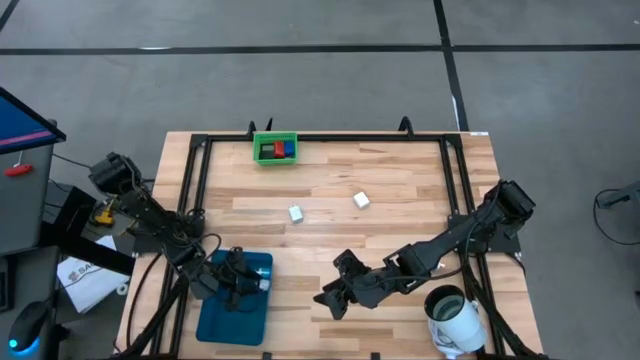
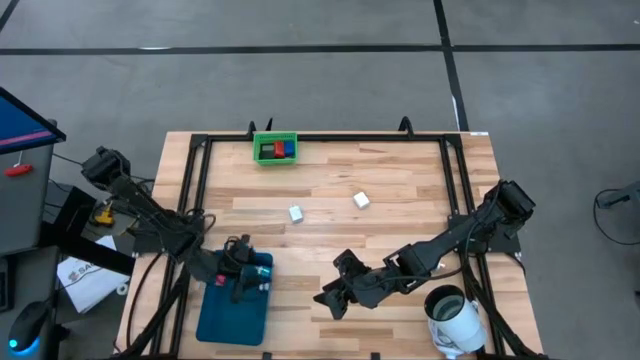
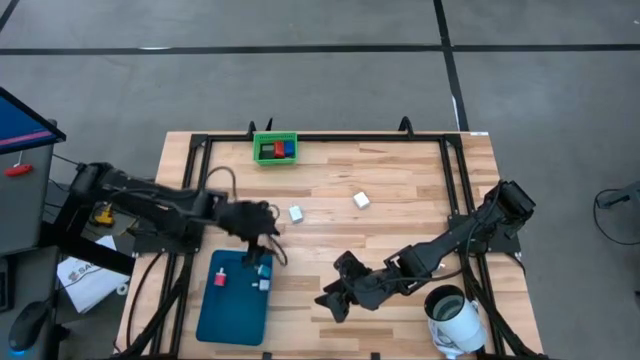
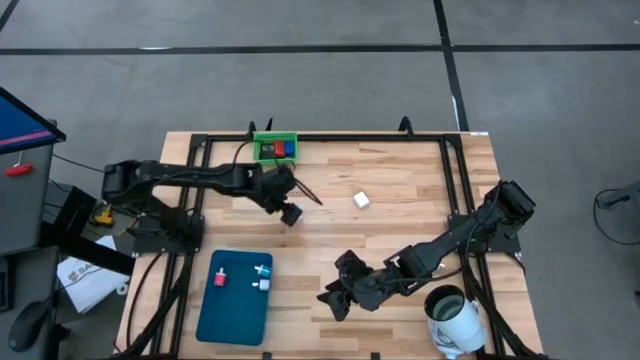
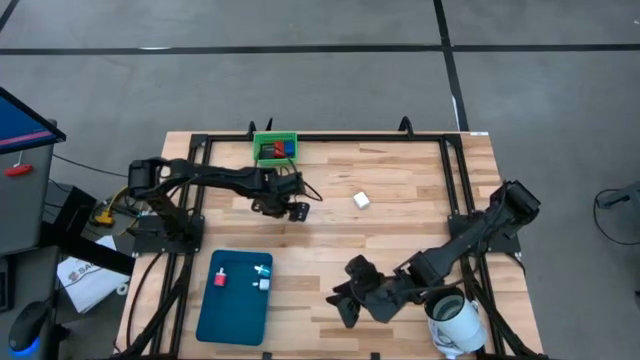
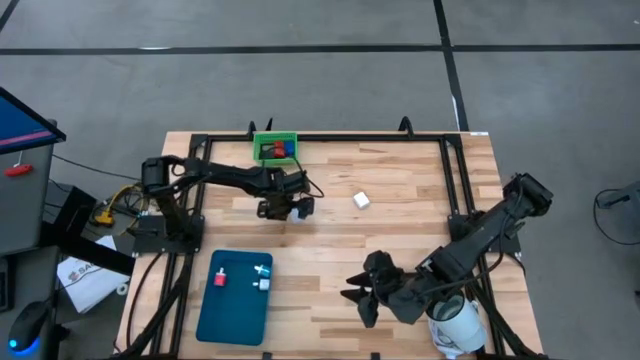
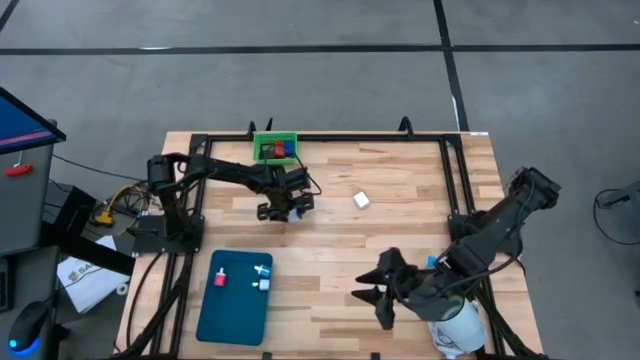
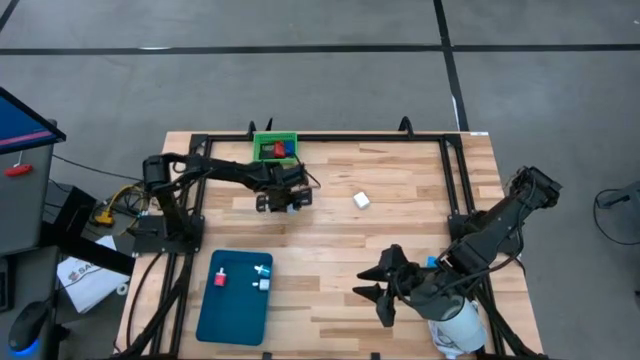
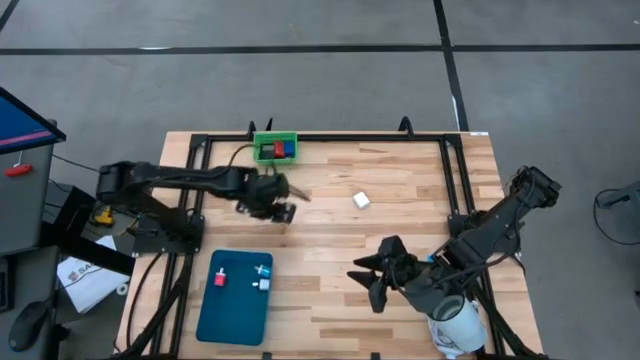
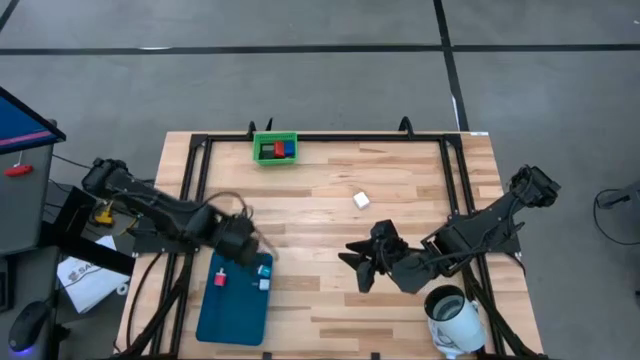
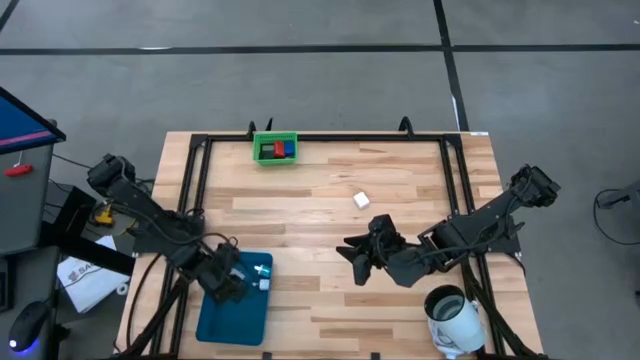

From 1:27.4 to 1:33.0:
Task: Pick & Place Office items
Put the left white charger adapter into the blue bin

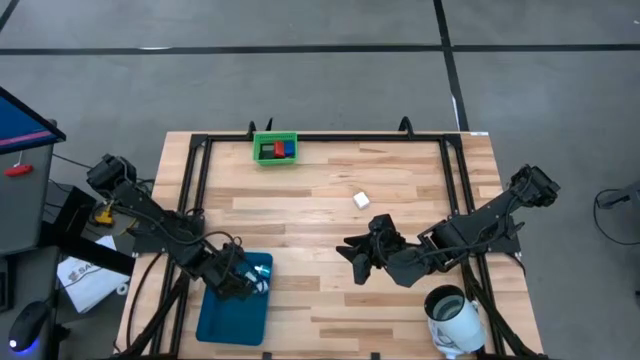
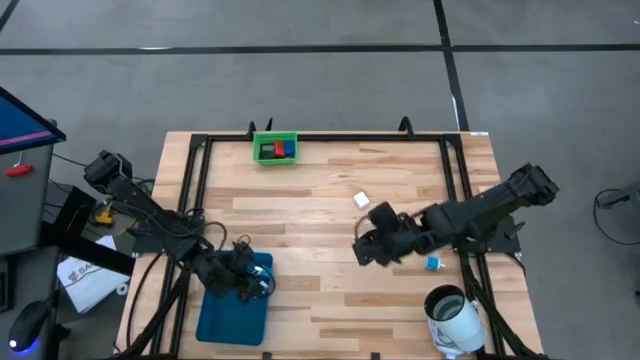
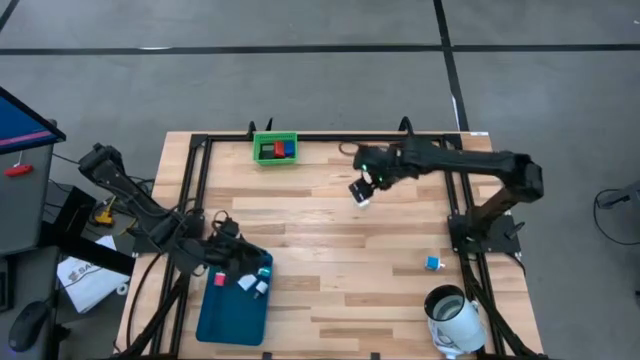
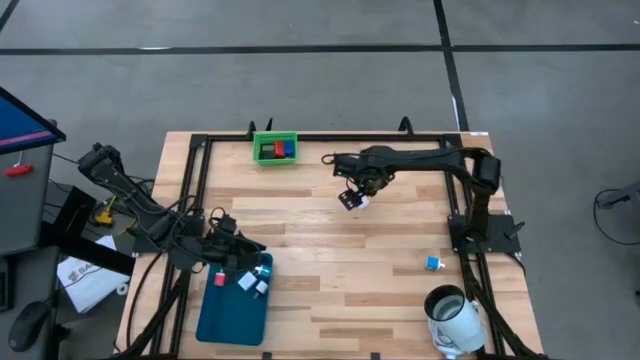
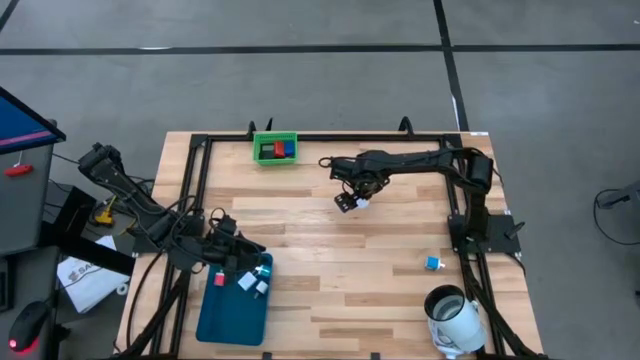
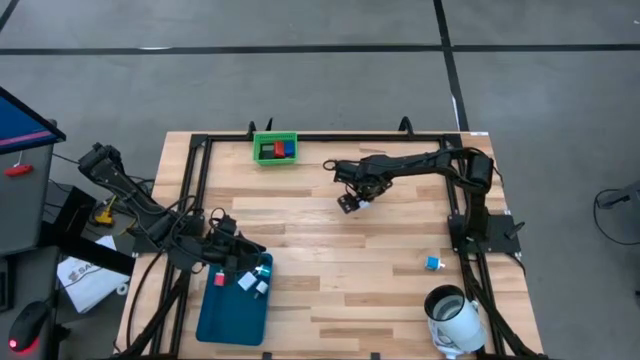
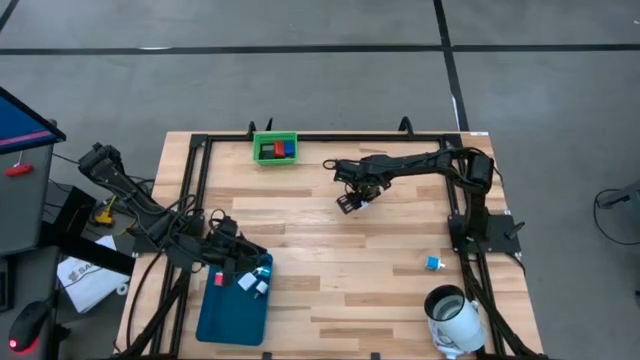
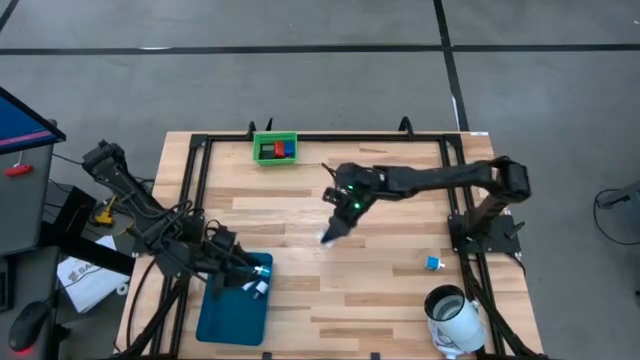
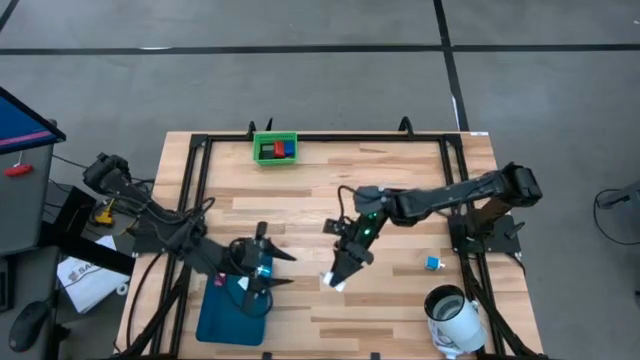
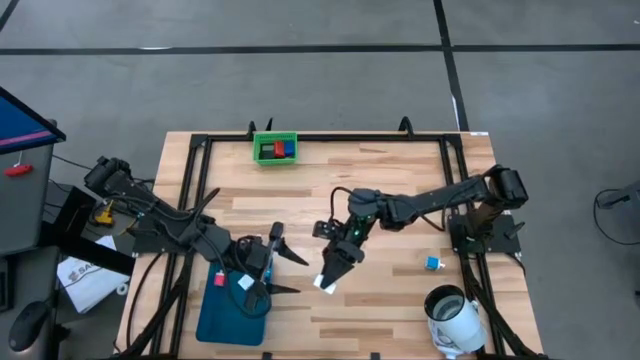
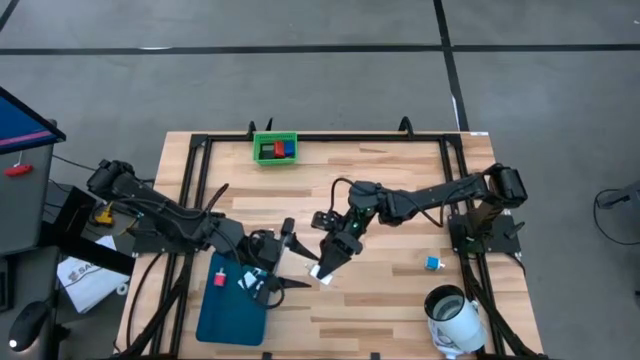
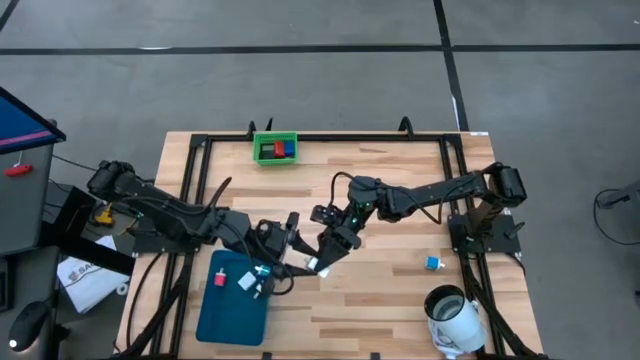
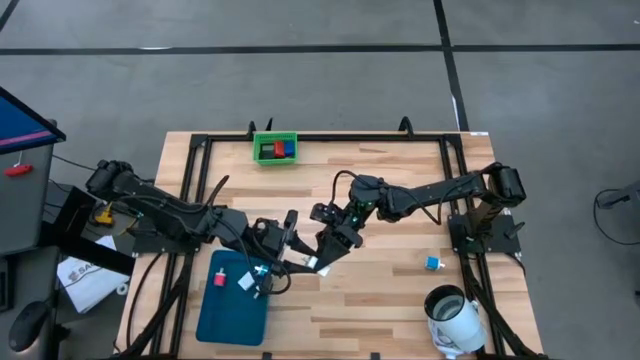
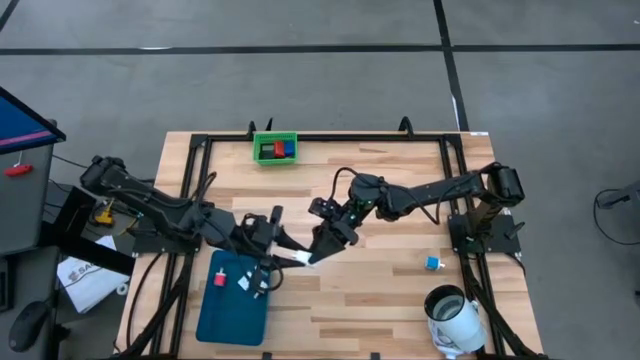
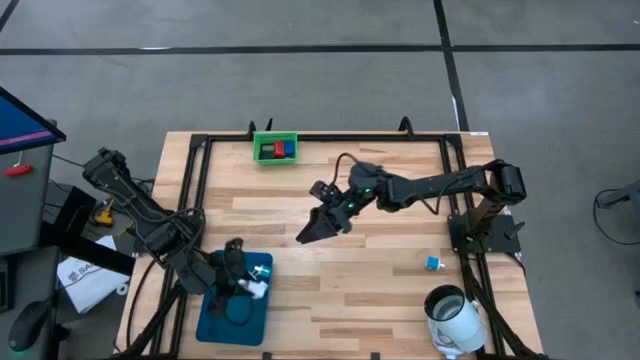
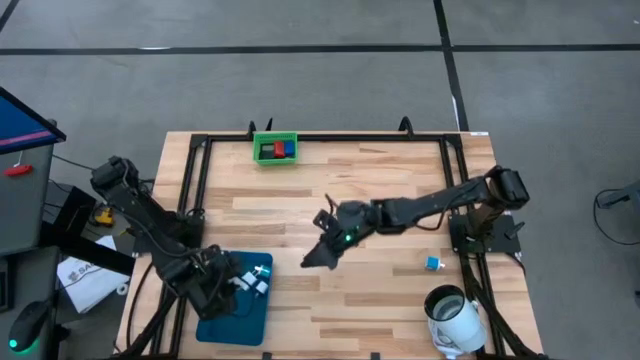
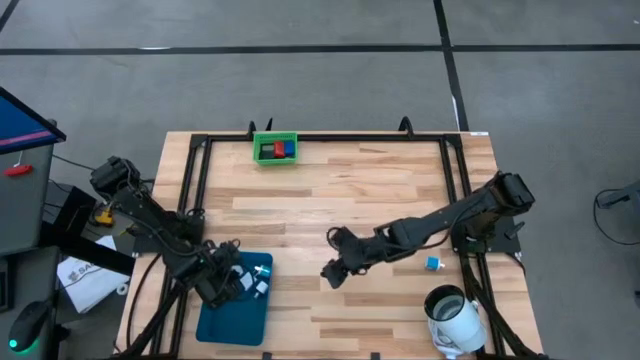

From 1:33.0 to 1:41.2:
Put the white charger adapter into the blue bin

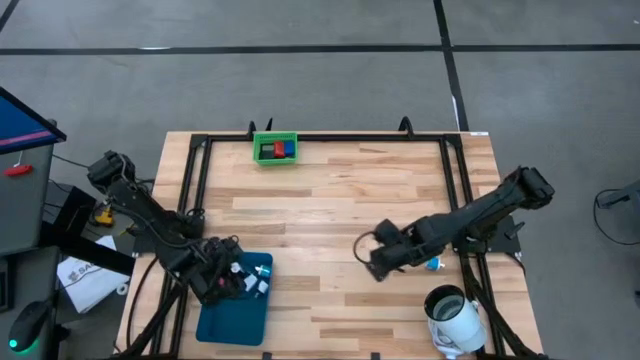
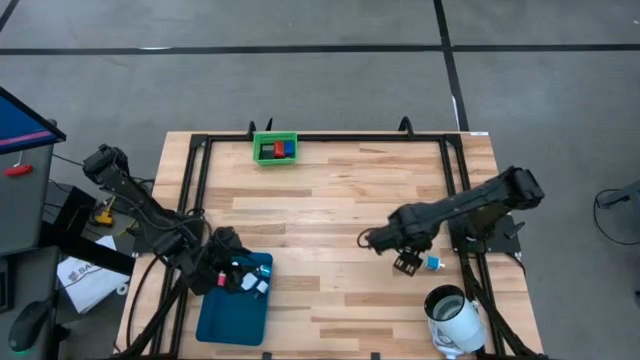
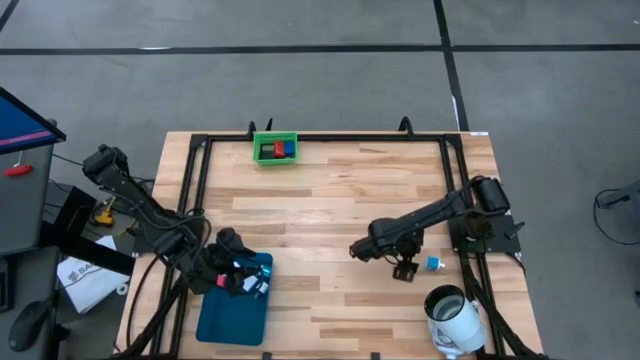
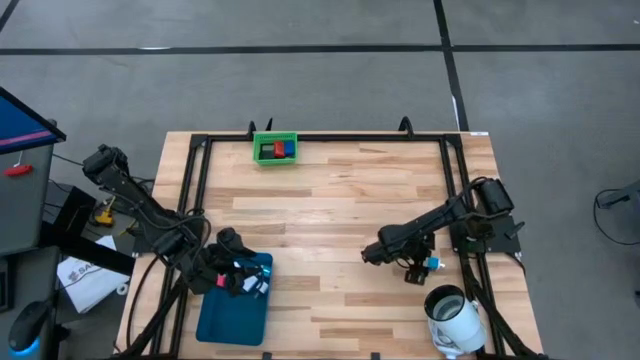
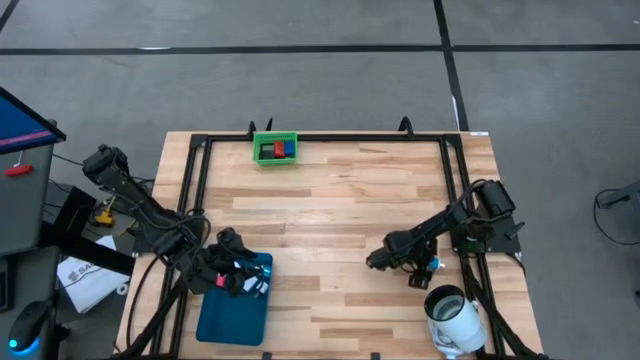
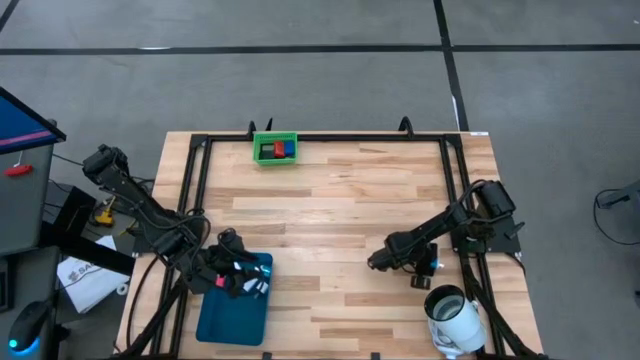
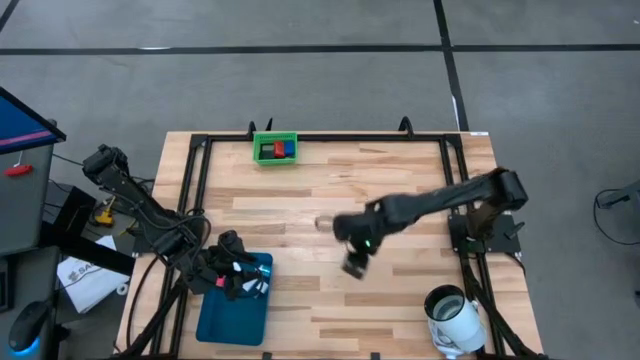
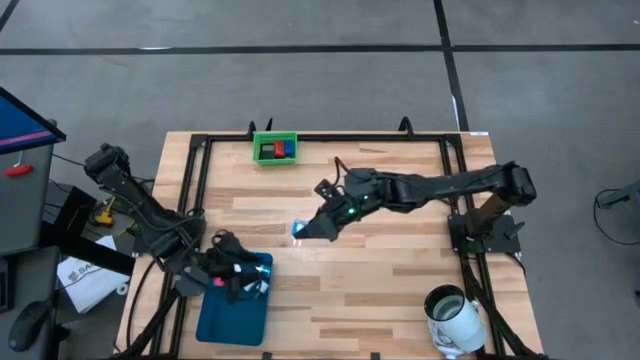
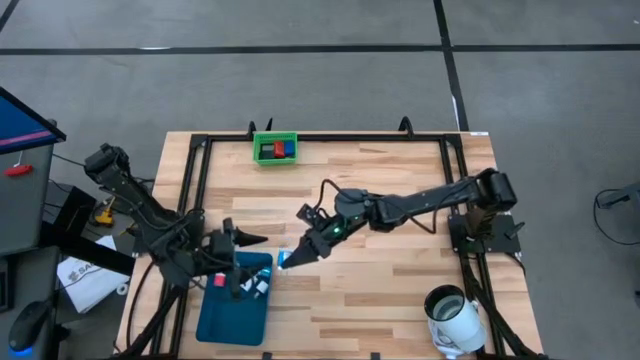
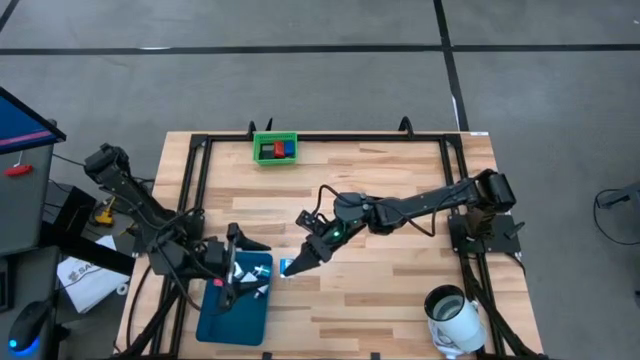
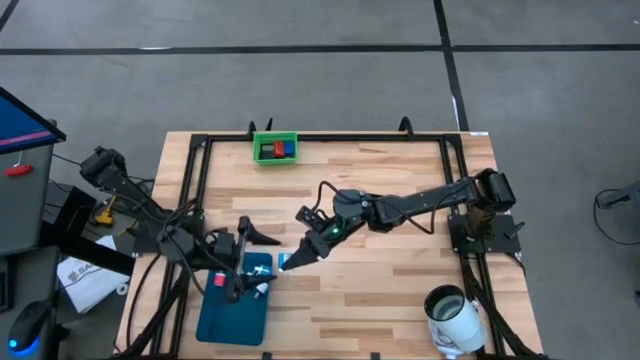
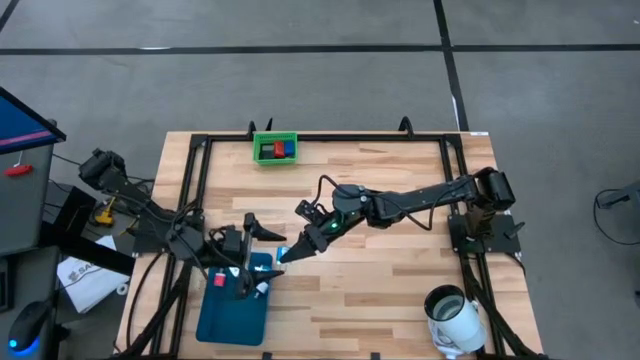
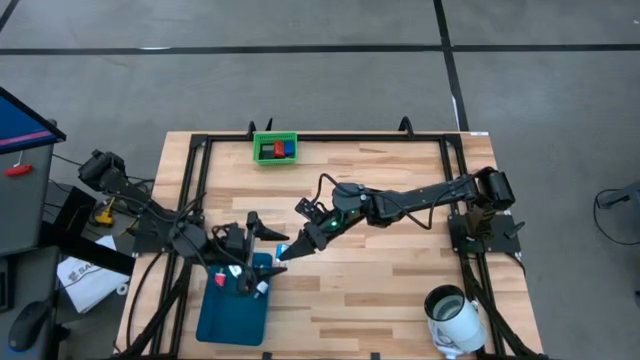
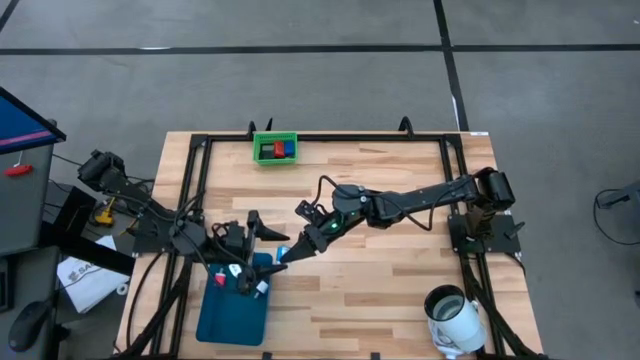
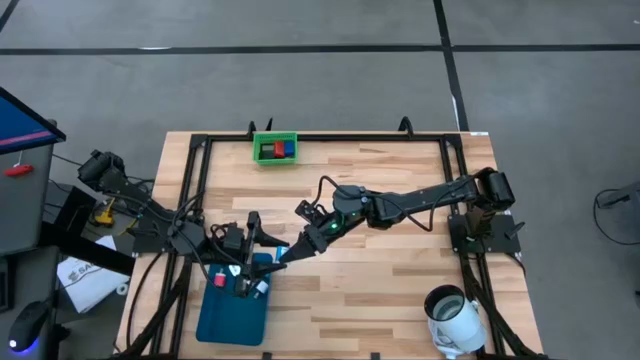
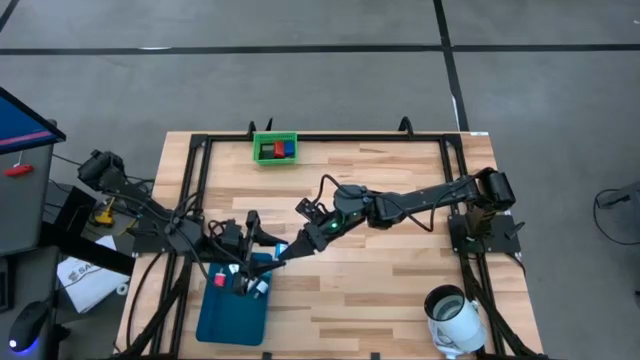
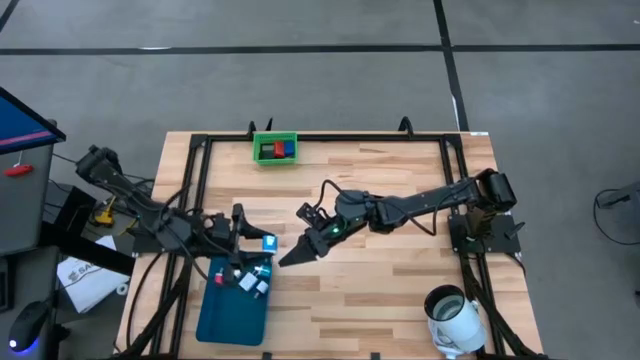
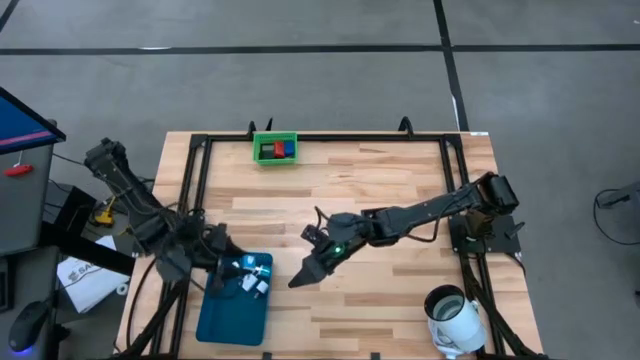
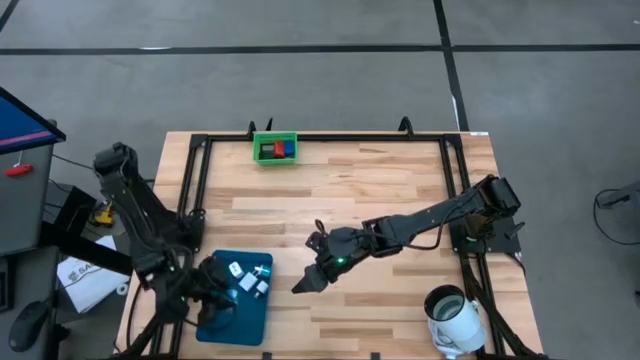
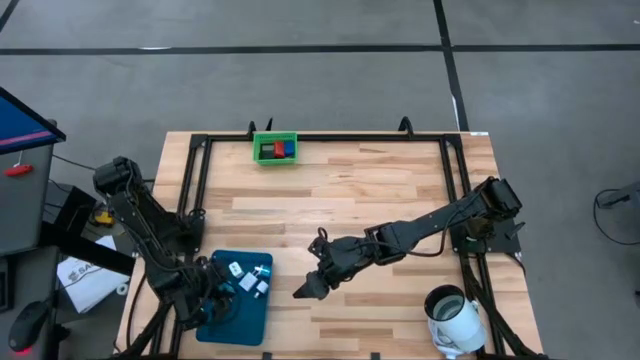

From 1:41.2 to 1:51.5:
Put the light blue charger adapter into the blue bin
